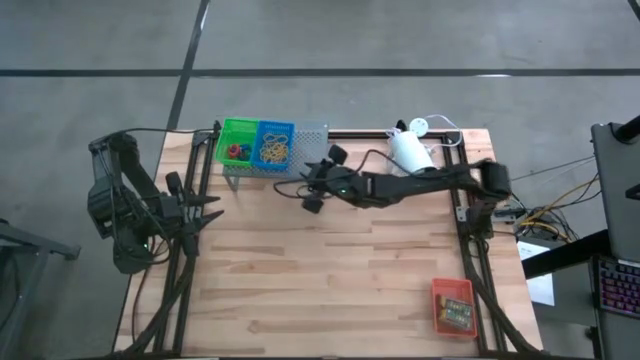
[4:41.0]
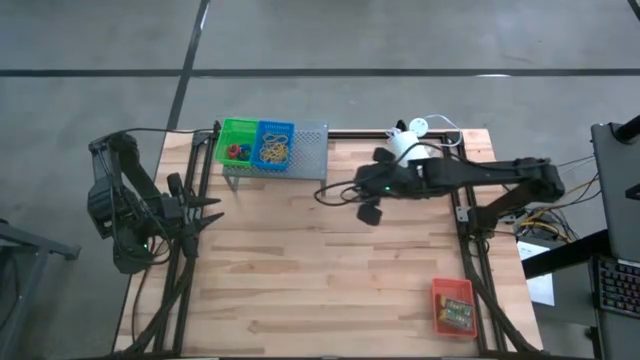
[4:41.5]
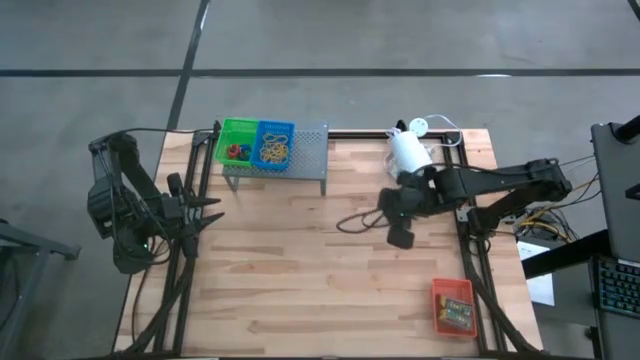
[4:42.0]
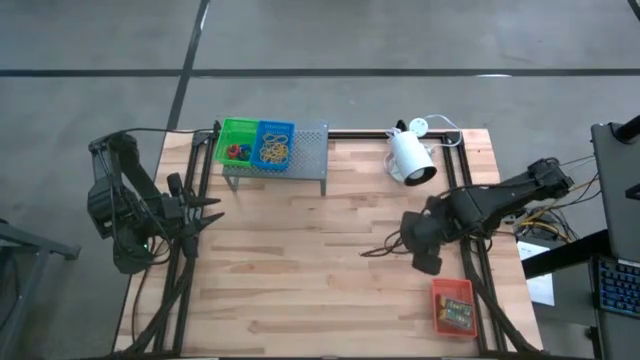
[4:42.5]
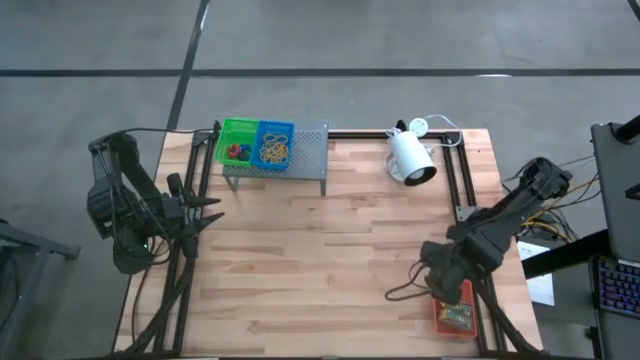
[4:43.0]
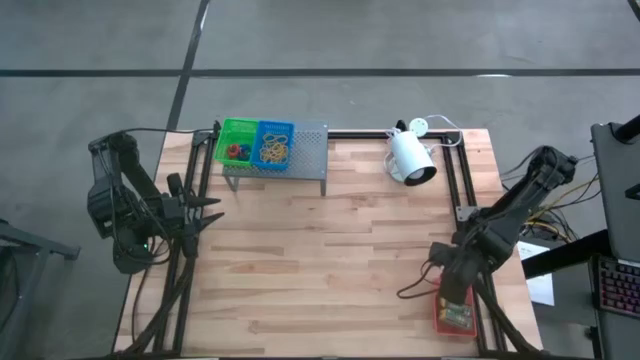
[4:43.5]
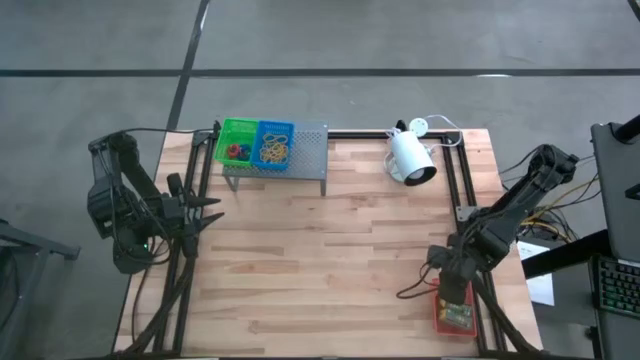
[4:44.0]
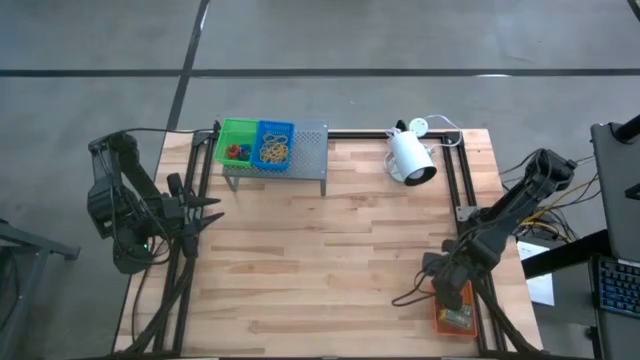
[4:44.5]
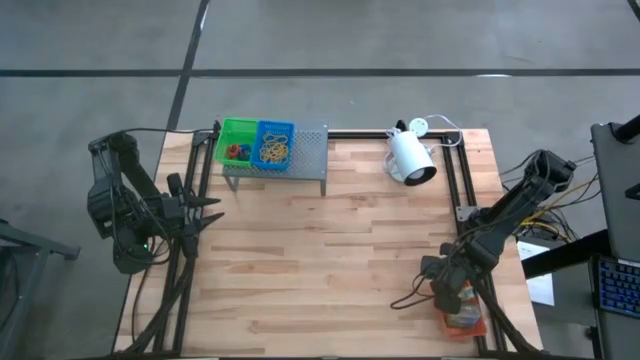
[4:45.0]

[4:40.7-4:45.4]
Task: Pick & Place Office Desk Supplies
Put the orange bin on the shelf

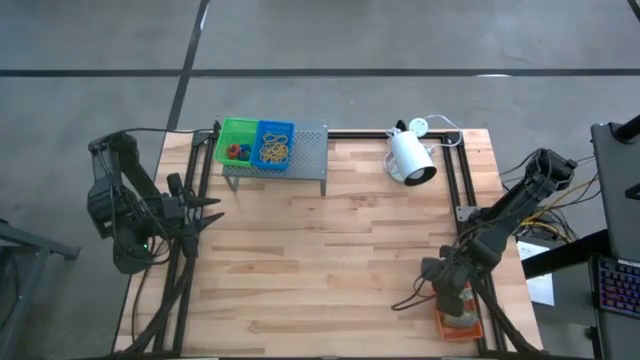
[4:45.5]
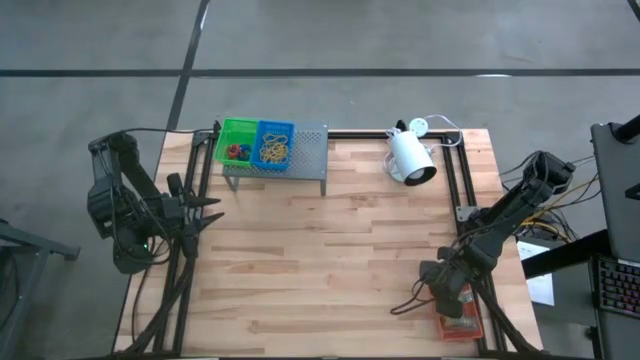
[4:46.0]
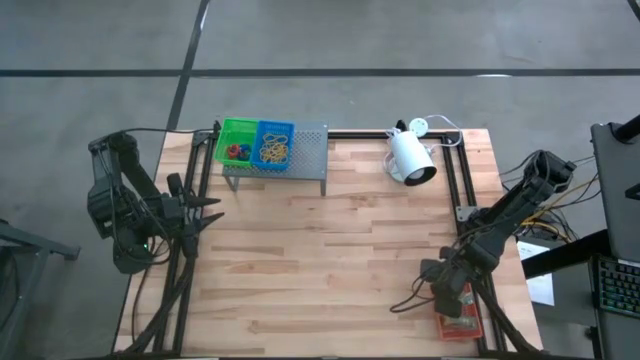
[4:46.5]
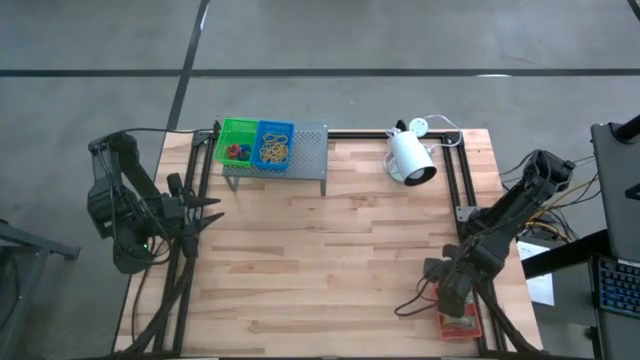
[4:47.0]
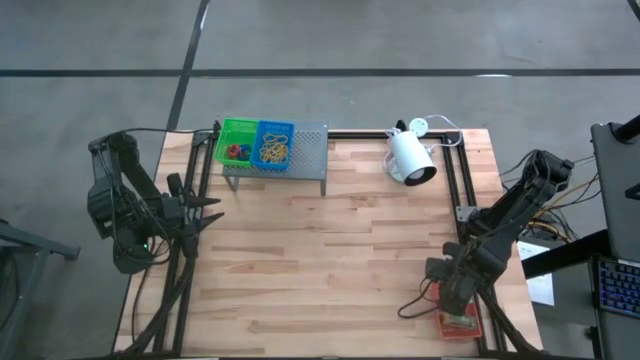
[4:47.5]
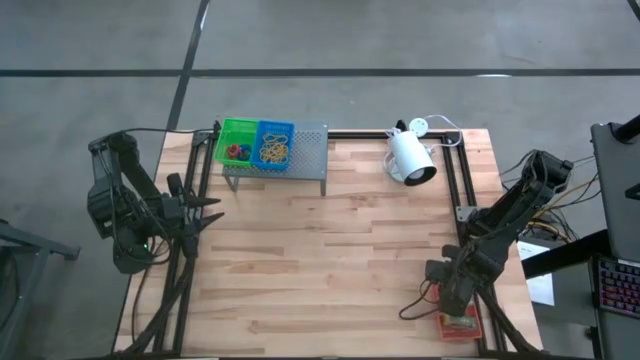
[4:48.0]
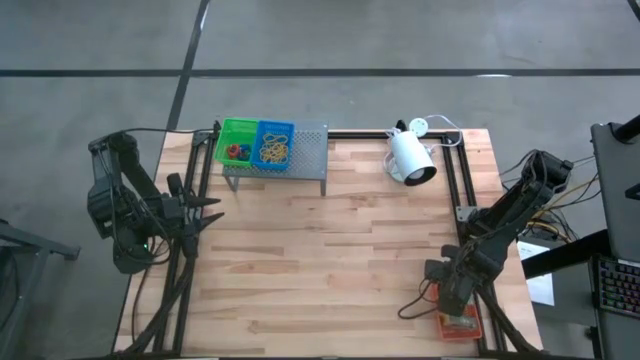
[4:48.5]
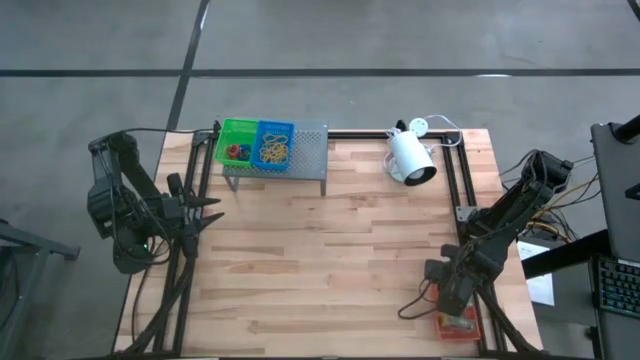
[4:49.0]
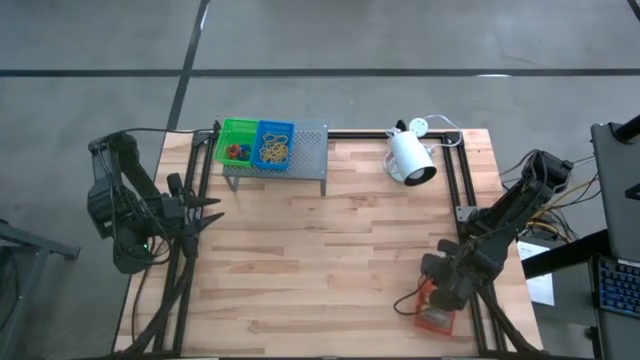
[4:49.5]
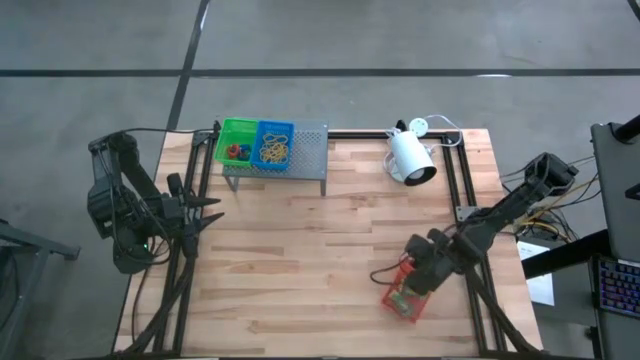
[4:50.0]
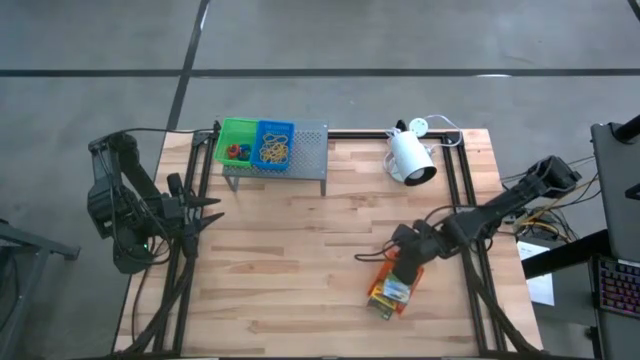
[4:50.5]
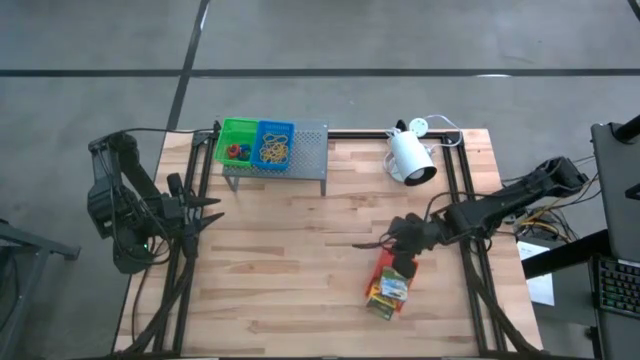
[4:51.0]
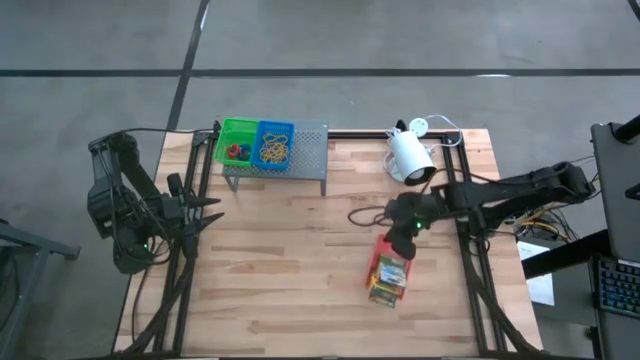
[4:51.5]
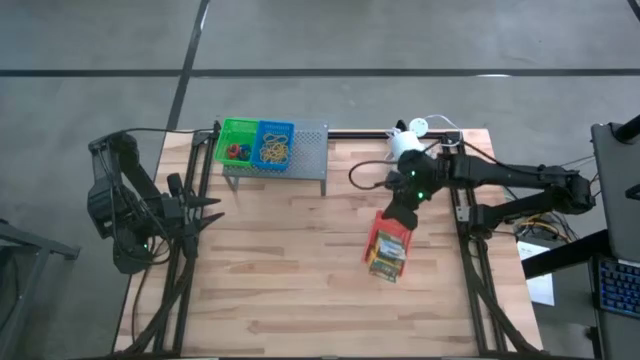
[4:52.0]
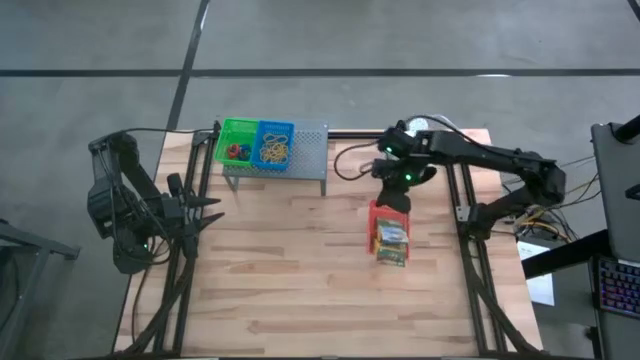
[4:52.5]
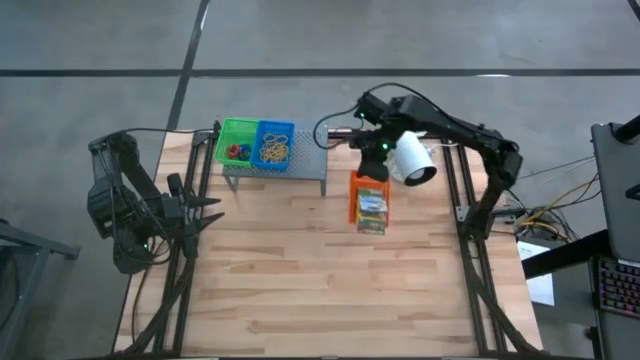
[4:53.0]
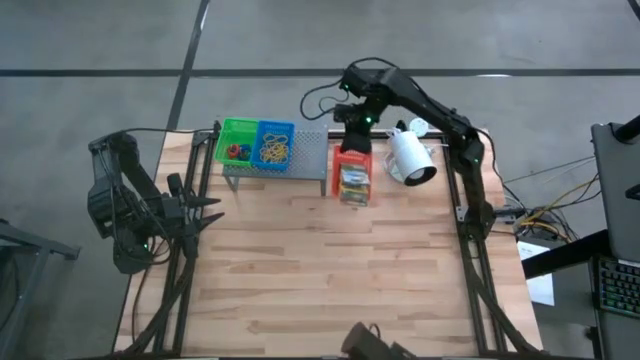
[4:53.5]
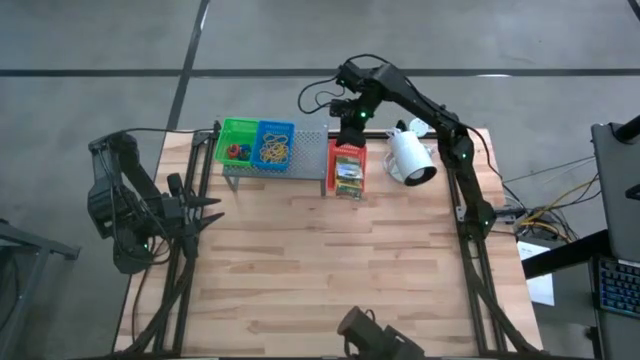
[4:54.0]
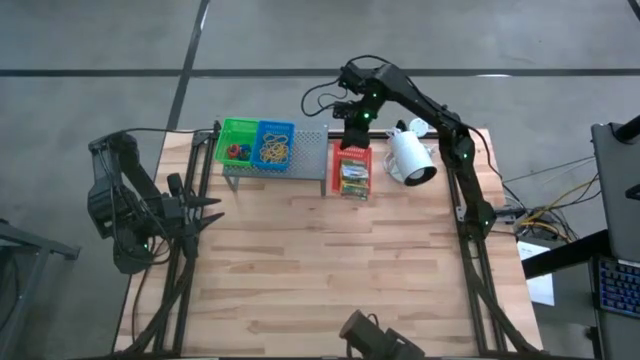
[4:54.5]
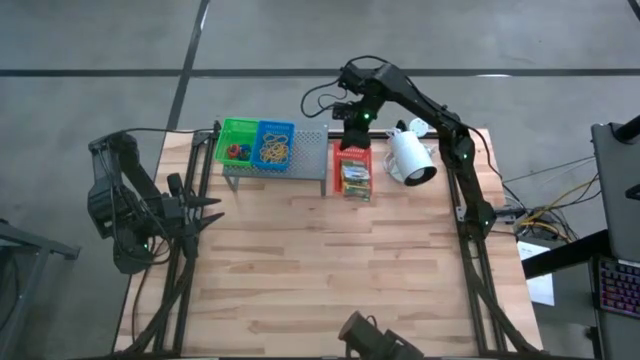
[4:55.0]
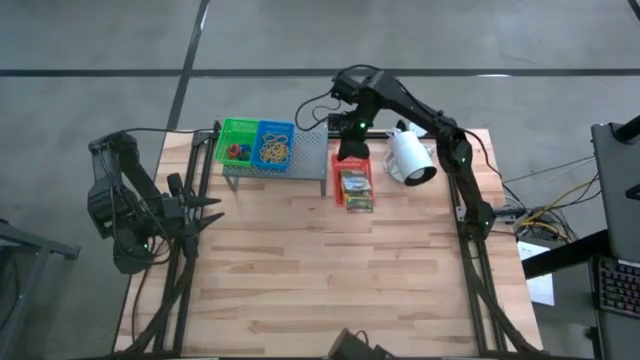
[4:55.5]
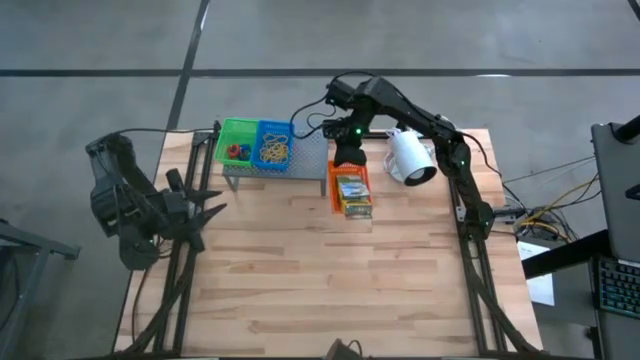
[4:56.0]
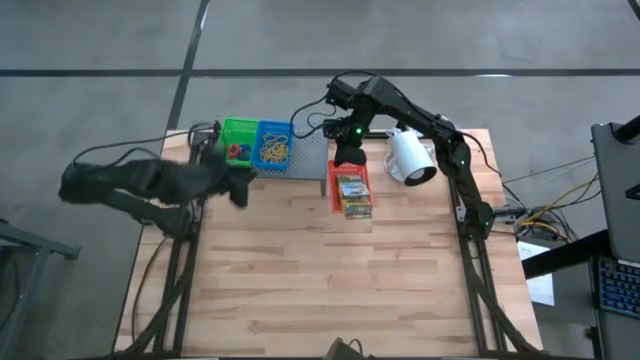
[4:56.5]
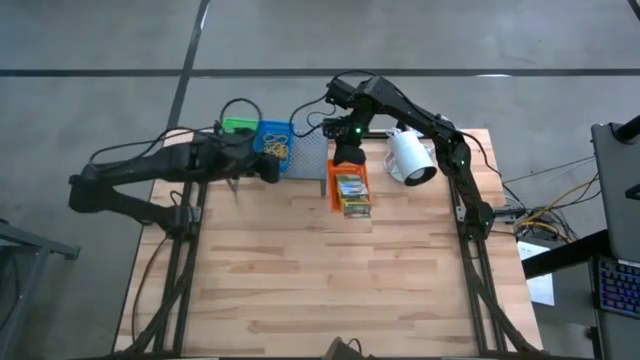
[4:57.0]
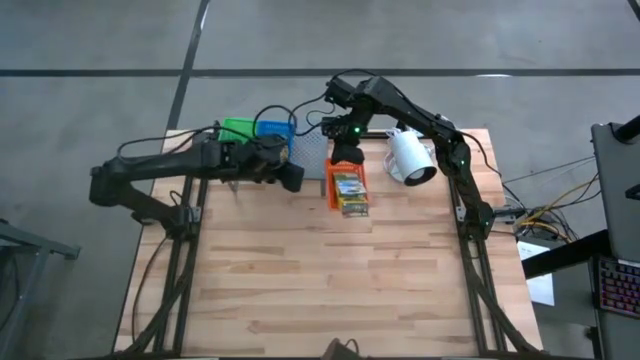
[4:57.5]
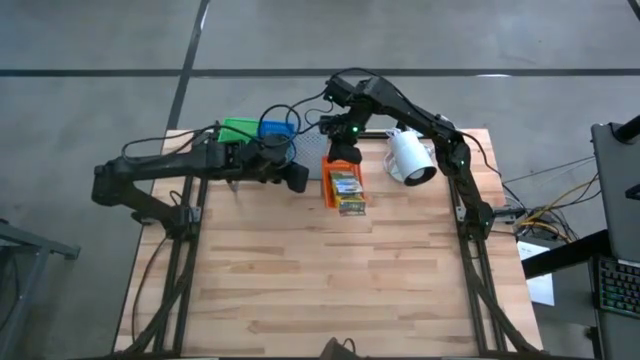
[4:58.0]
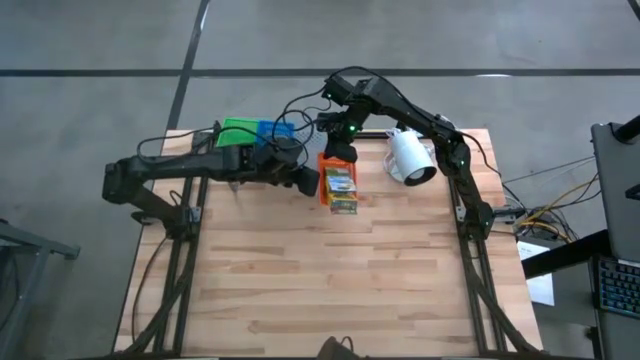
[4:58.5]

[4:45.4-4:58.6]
Put the orange bin on the shelf

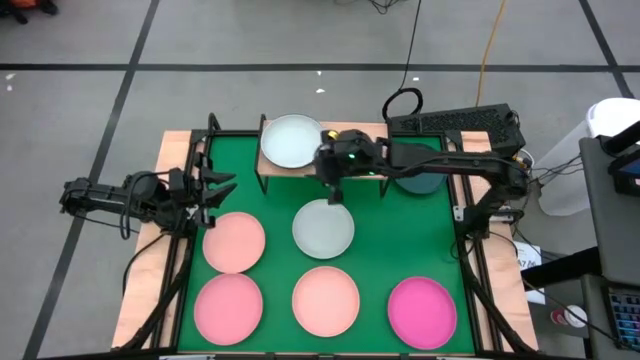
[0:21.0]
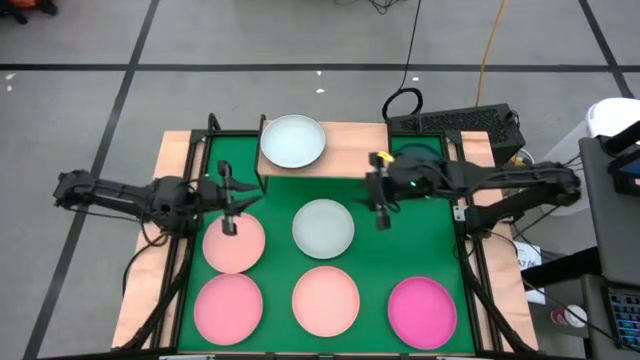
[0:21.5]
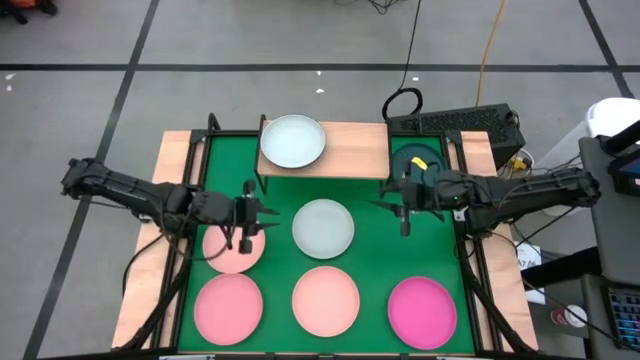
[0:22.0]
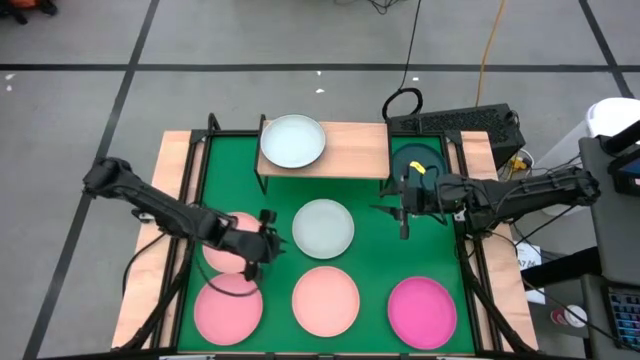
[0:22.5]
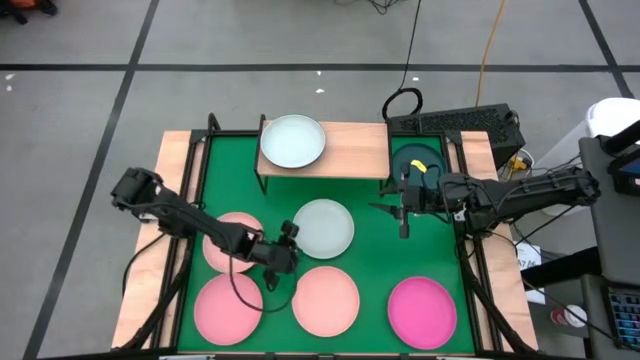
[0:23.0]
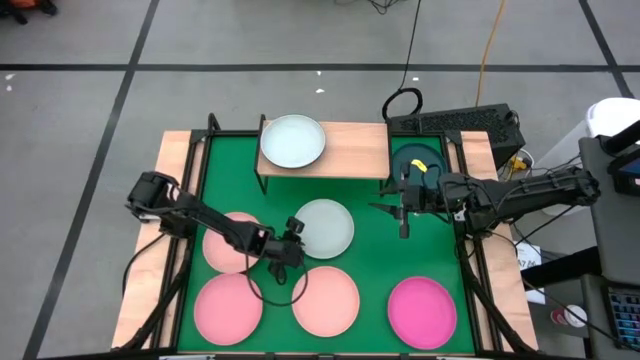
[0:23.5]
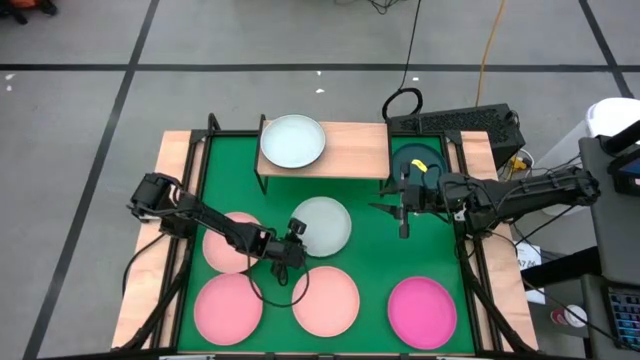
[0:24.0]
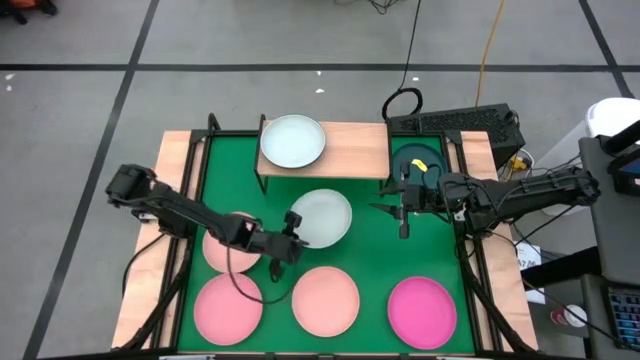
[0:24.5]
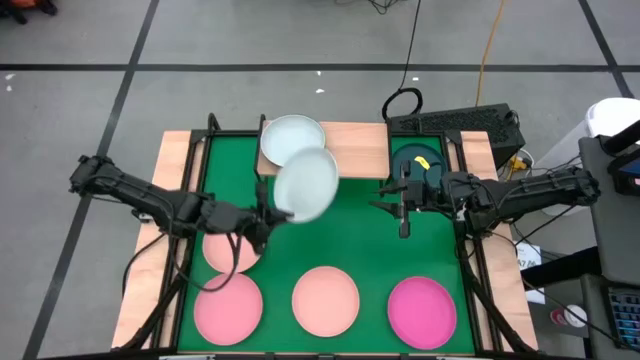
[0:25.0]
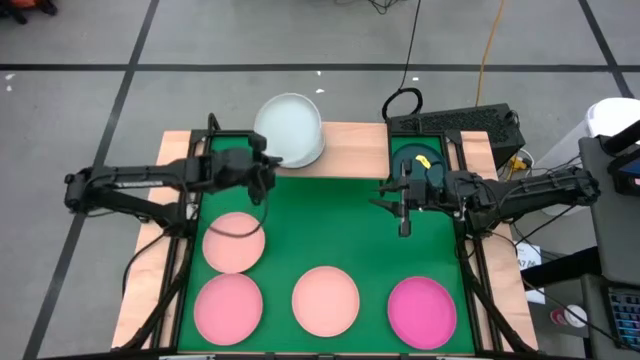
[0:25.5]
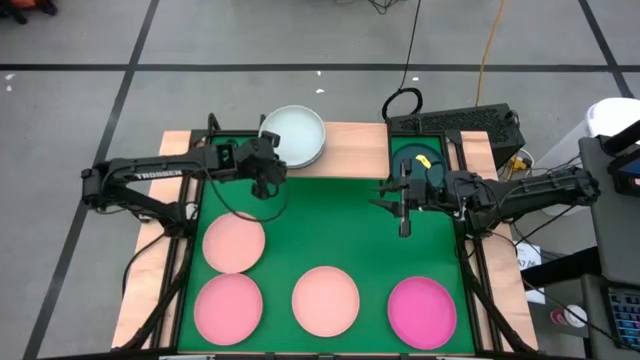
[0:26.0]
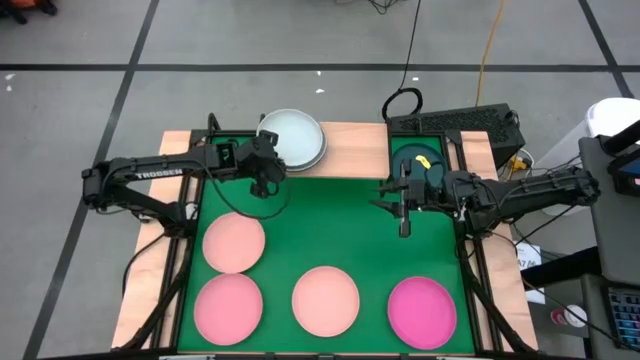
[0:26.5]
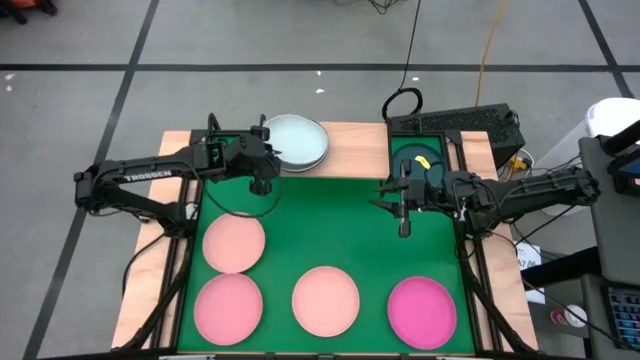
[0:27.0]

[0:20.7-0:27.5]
Task: Place and stack plates onto a shelf
Stack the white plate on top of the other white plate on the shelf
